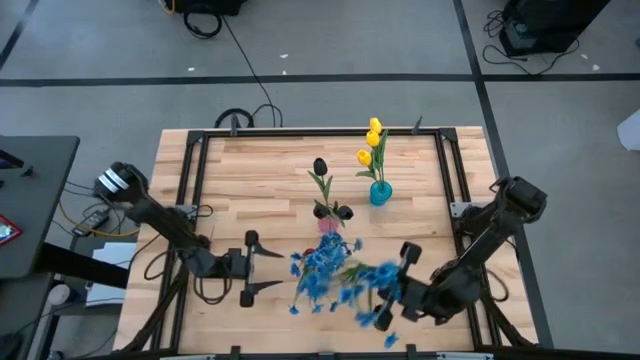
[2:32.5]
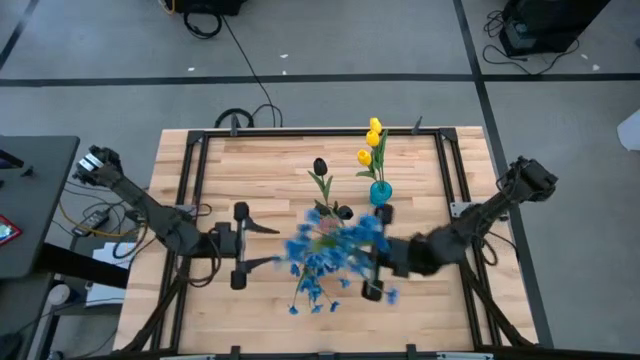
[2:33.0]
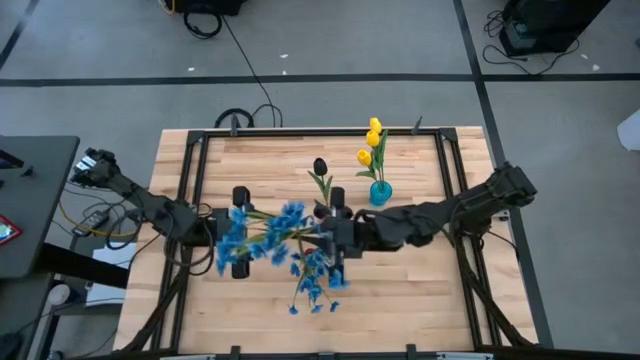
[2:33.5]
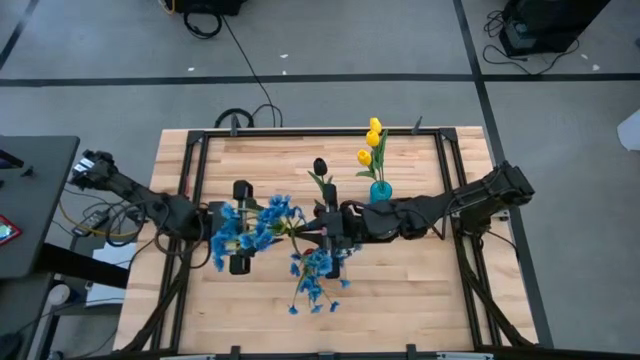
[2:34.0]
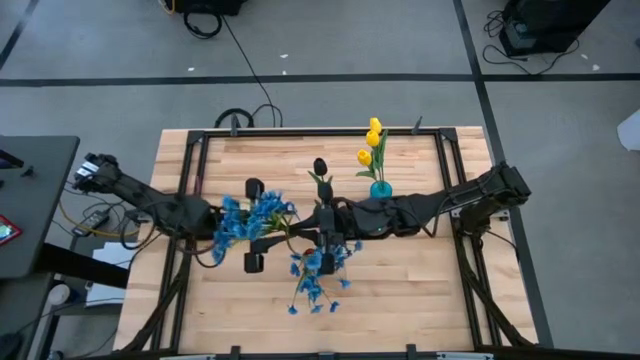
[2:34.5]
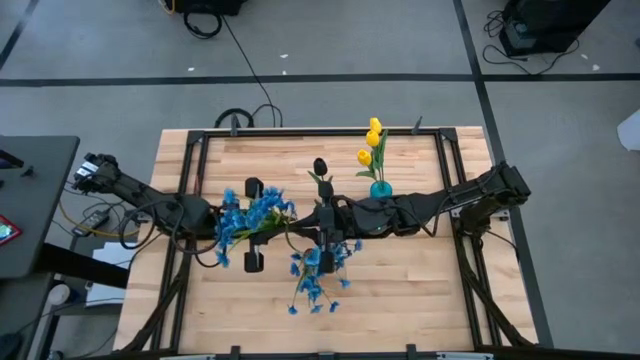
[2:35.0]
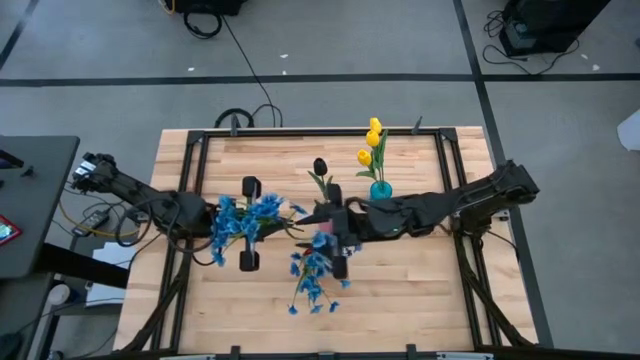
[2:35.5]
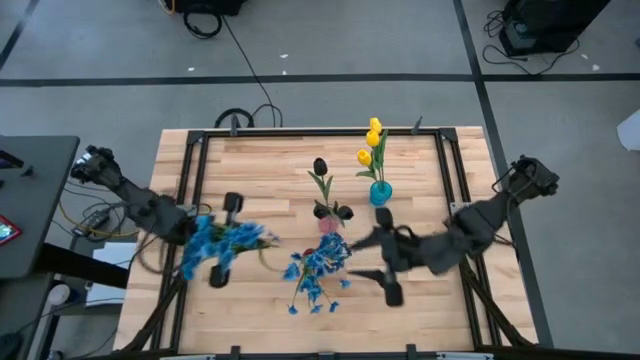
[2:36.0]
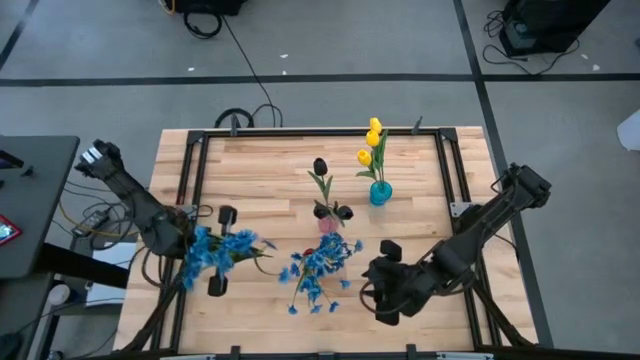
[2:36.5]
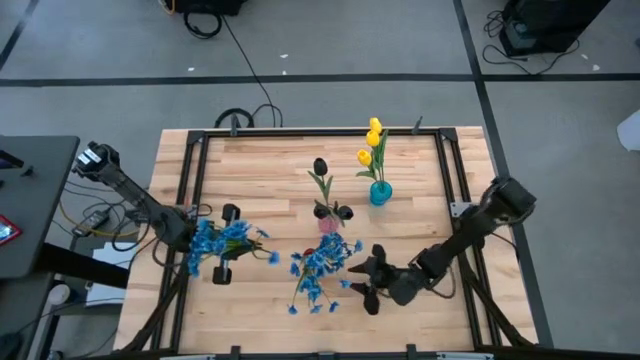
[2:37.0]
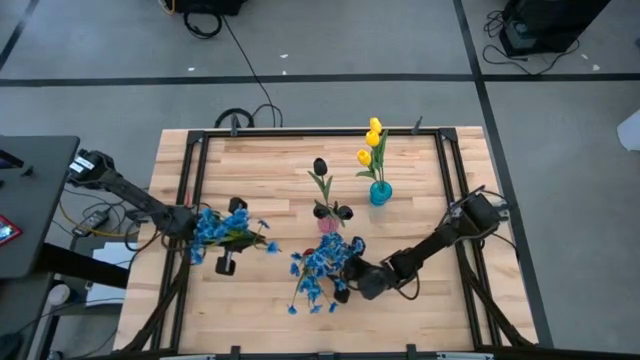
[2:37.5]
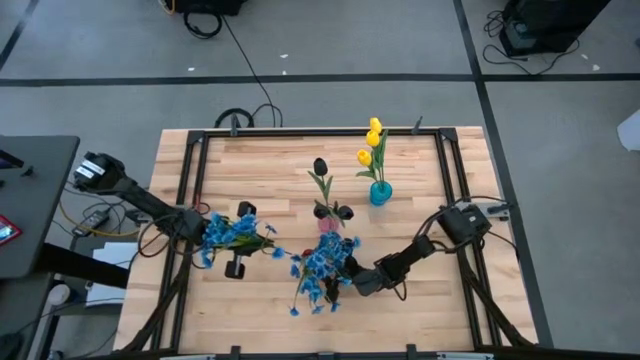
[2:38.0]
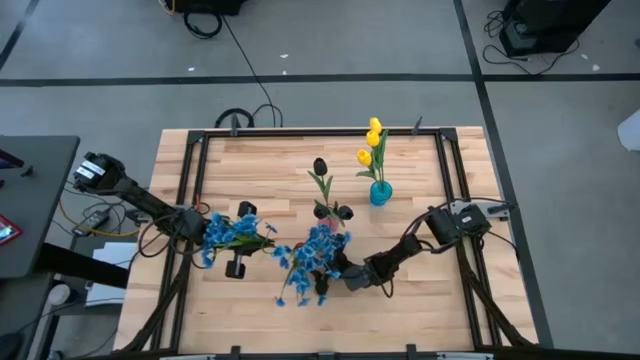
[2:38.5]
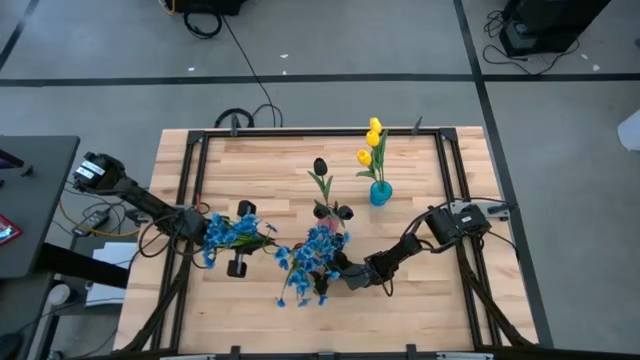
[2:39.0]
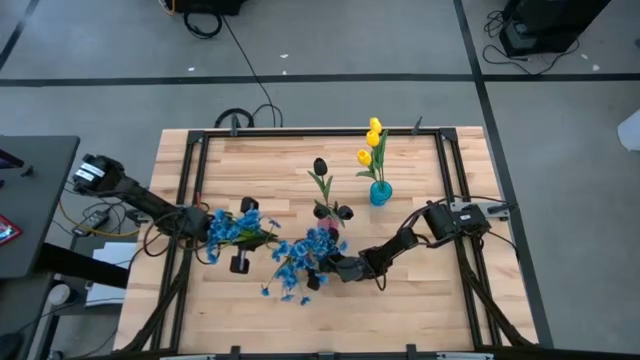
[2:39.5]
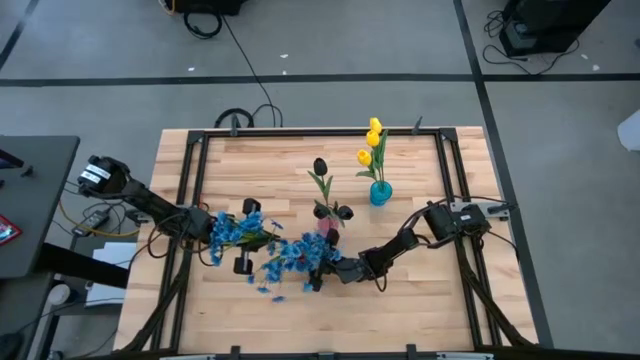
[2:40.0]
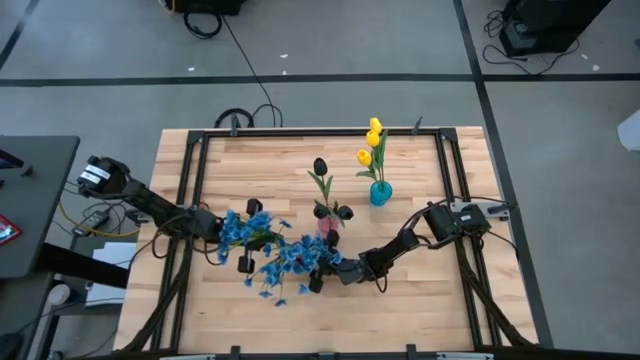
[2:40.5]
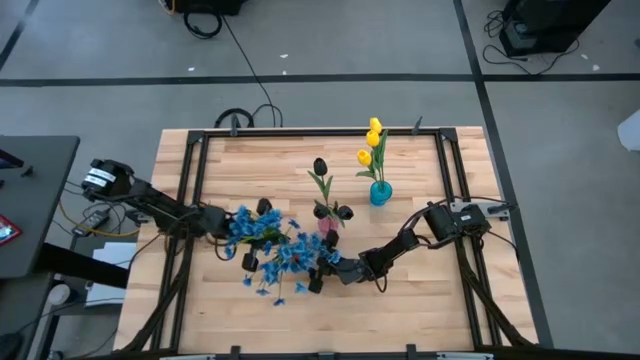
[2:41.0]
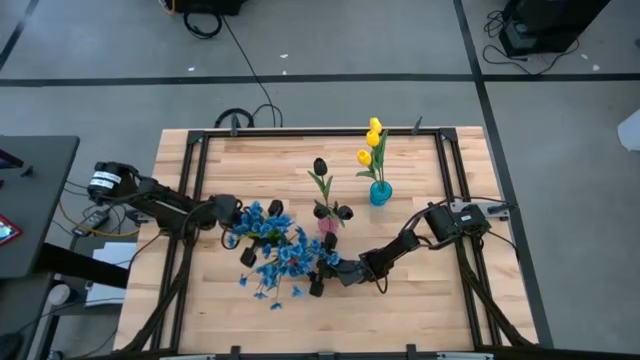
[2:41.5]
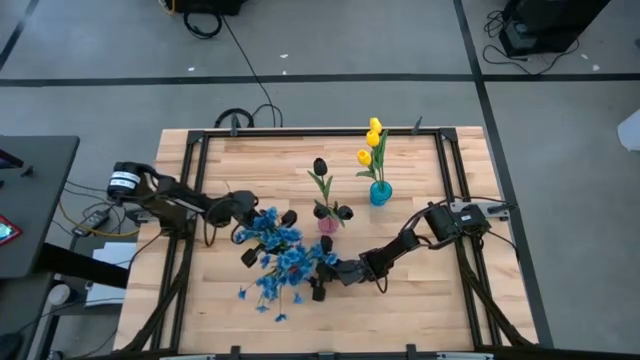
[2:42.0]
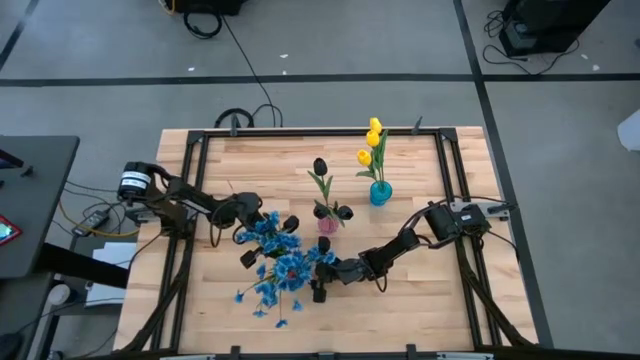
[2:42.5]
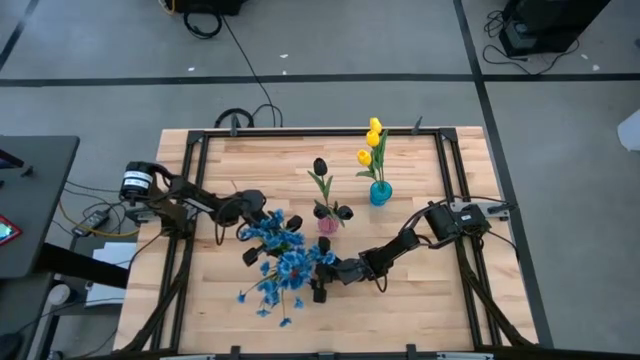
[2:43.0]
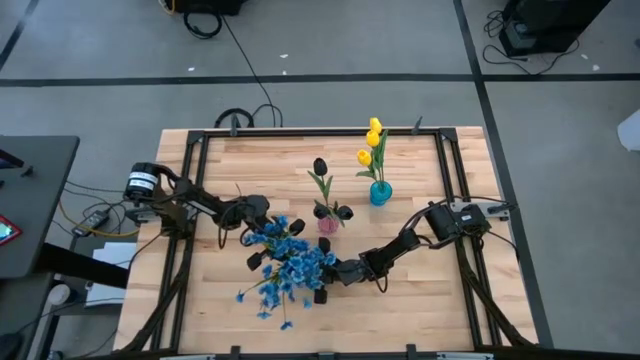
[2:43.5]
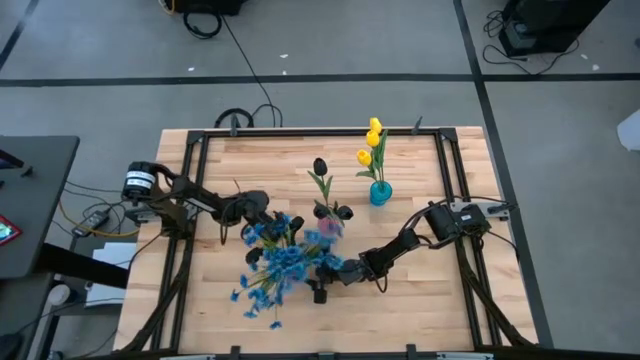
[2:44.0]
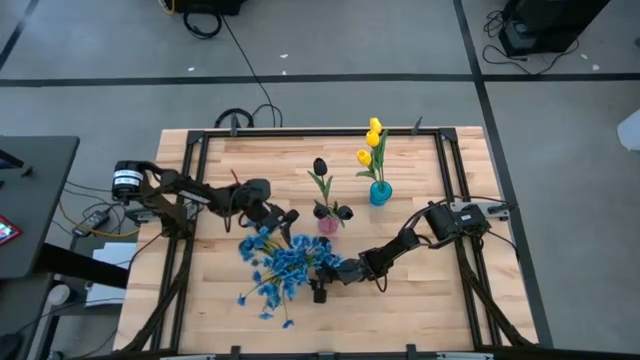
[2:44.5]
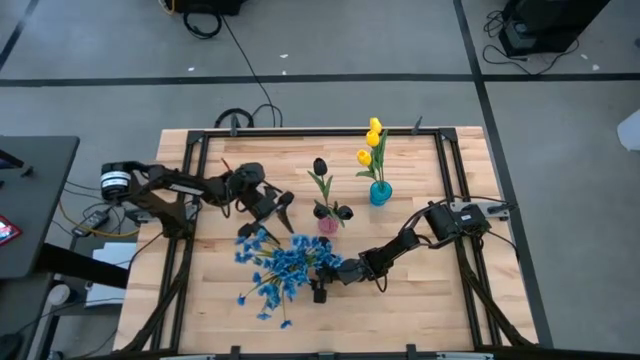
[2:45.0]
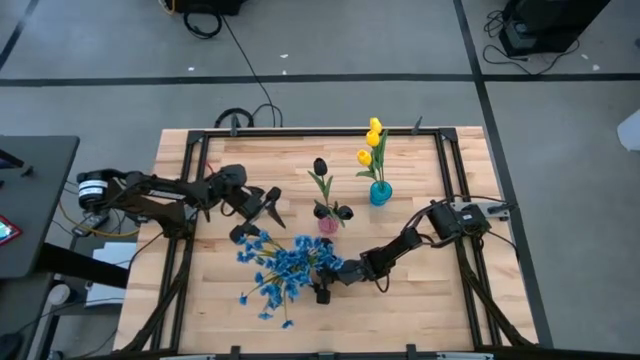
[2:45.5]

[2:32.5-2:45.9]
Task: Sort flowers into vase by color
Put the blue flower into the red vase

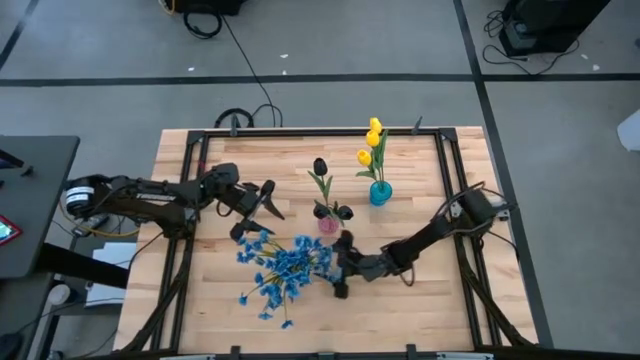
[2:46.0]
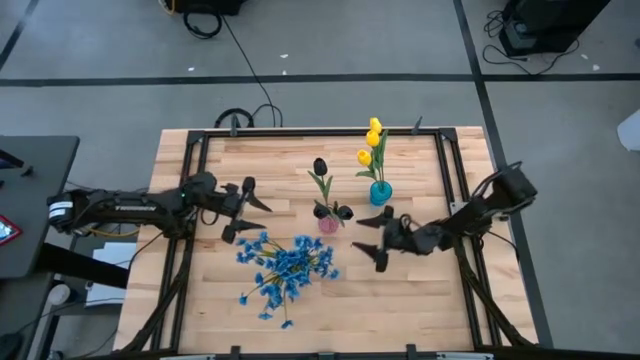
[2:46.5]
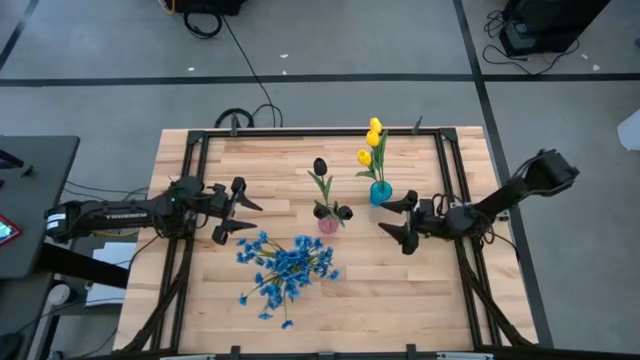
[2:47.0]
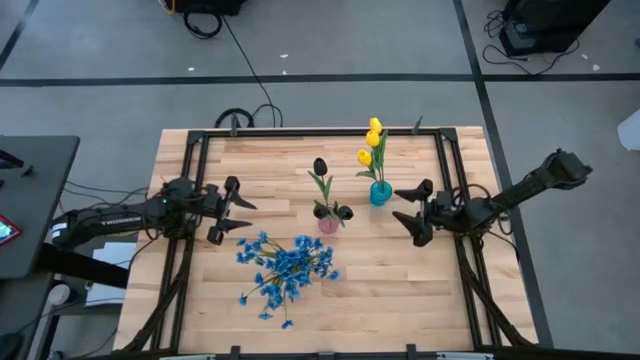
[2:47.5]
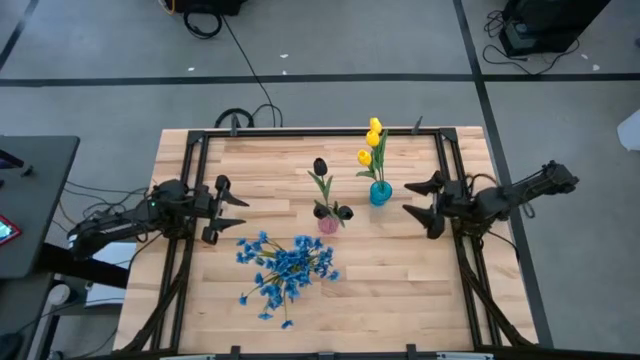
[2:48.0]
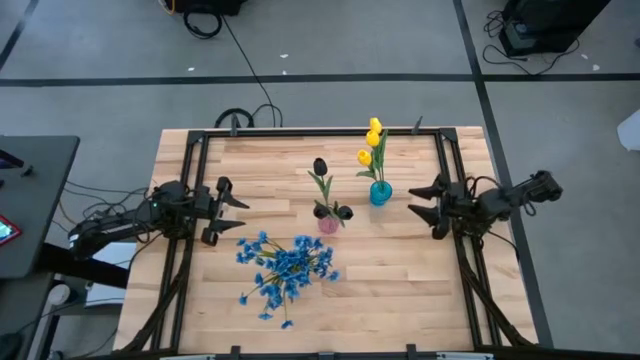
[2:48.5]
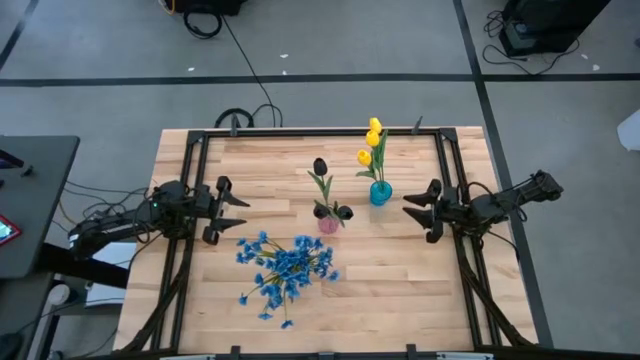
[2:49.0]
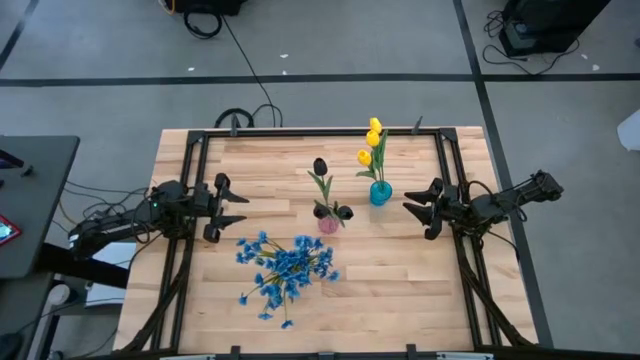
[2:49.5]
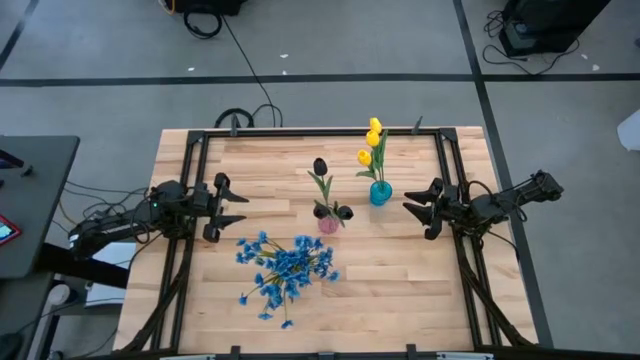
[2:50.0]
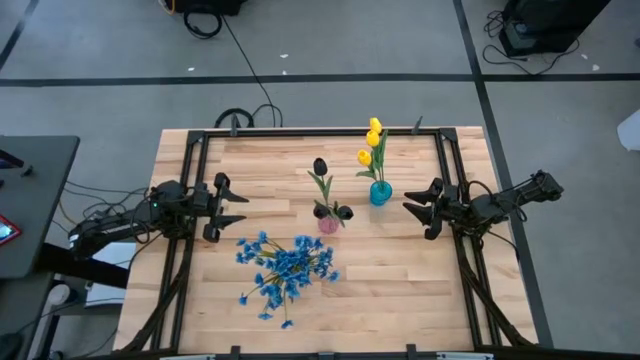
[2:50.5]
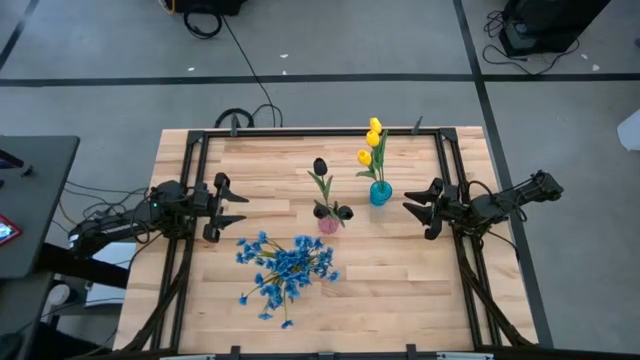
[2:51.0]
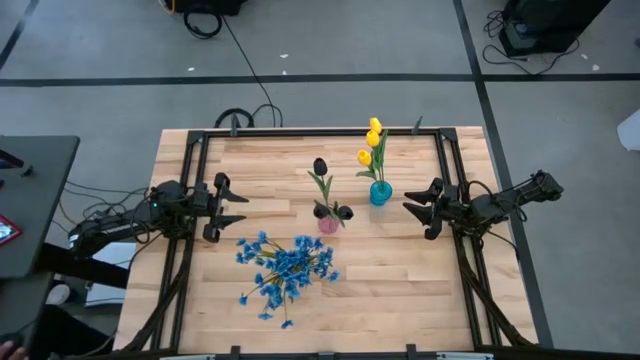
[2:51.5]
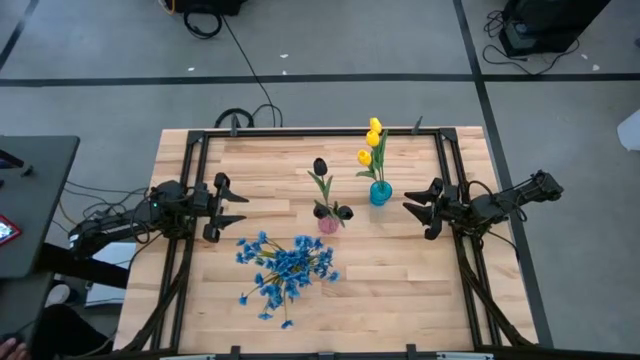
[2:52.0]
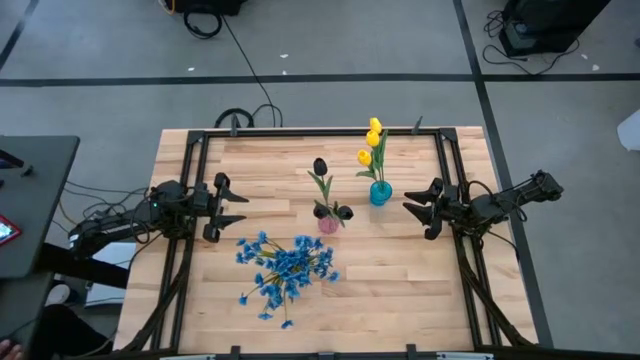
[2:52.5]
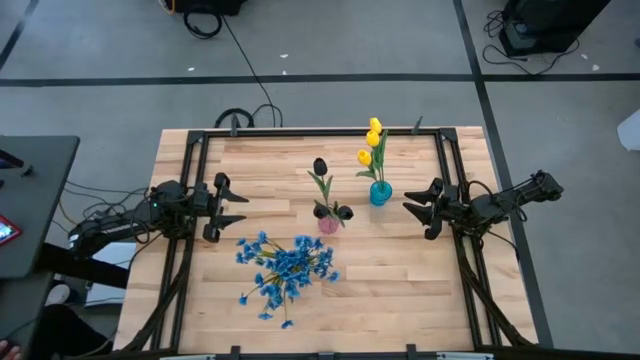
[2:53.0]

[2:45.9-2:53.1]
Return to Home Position
